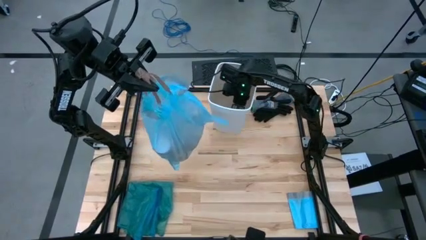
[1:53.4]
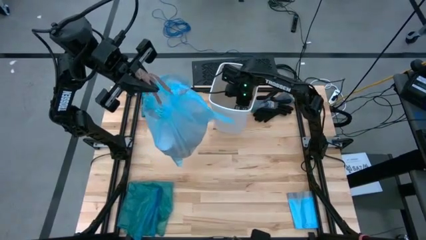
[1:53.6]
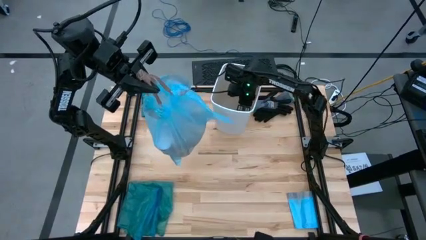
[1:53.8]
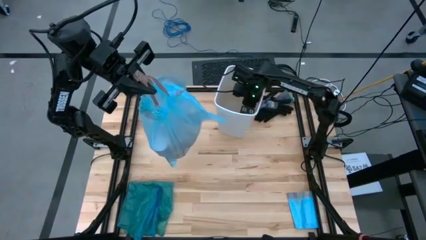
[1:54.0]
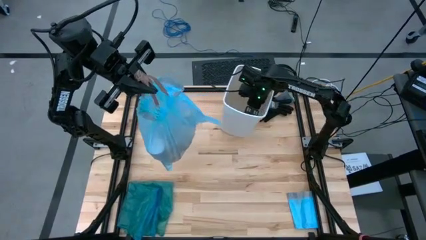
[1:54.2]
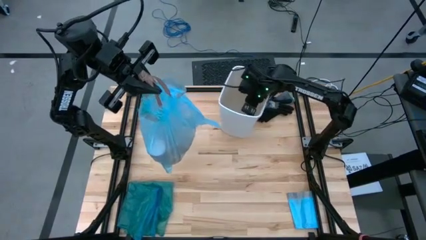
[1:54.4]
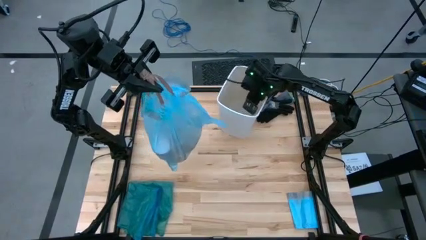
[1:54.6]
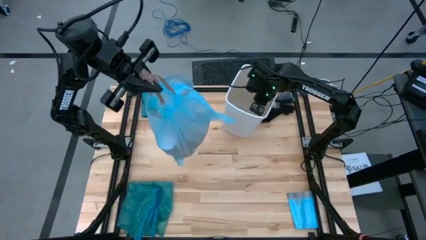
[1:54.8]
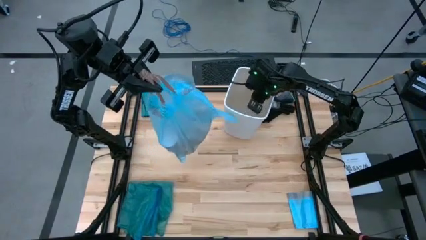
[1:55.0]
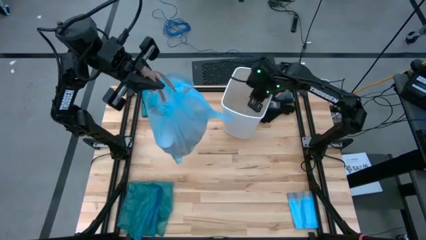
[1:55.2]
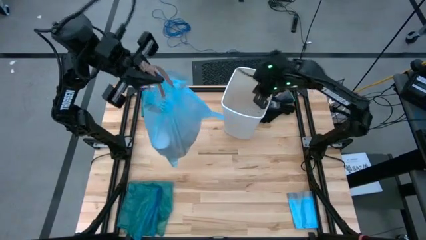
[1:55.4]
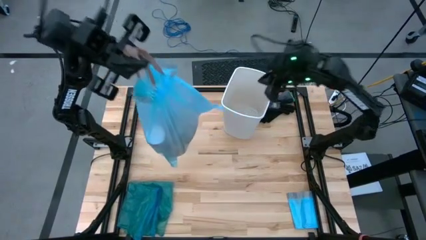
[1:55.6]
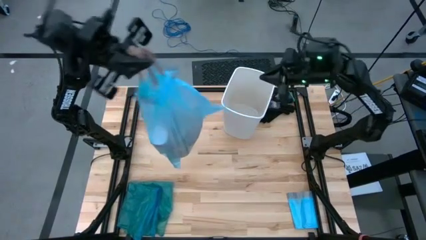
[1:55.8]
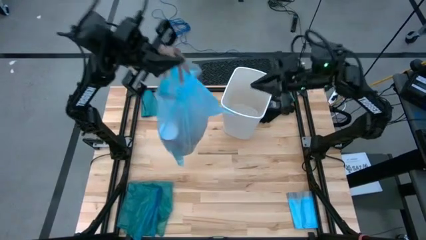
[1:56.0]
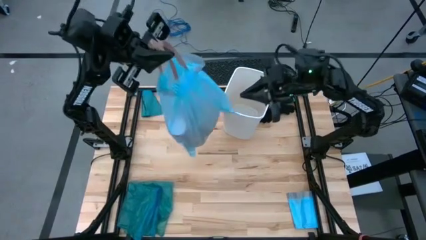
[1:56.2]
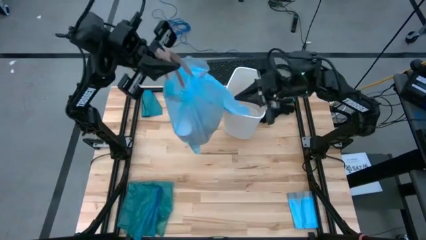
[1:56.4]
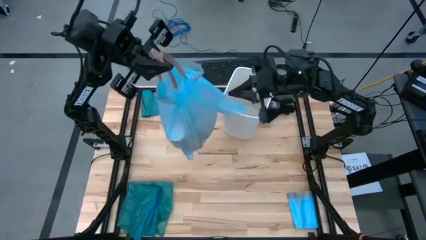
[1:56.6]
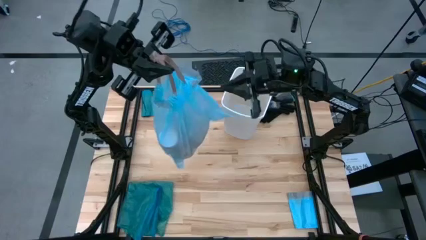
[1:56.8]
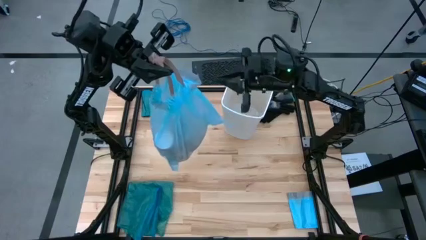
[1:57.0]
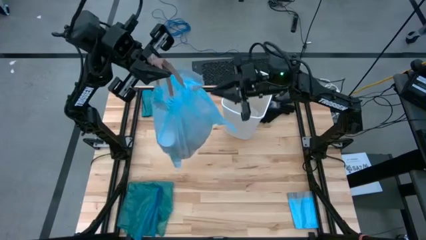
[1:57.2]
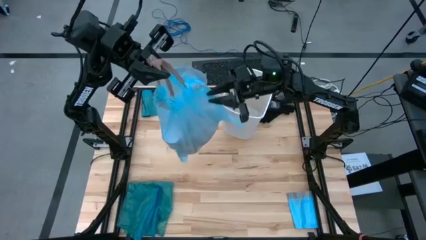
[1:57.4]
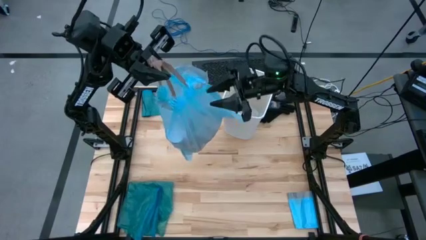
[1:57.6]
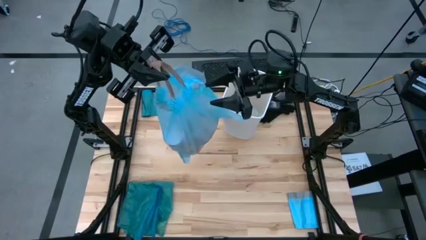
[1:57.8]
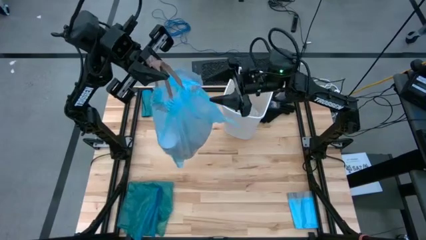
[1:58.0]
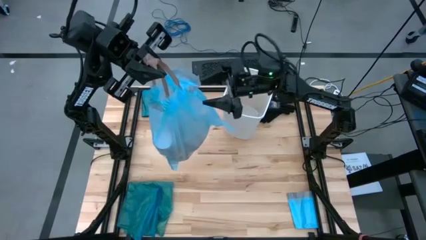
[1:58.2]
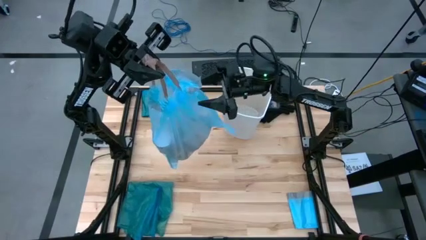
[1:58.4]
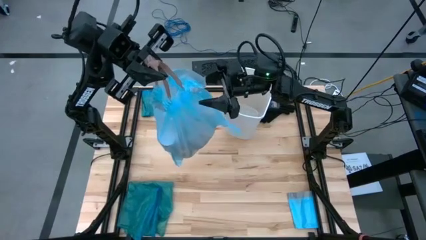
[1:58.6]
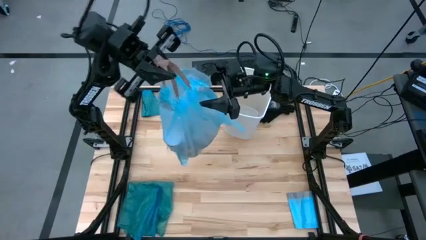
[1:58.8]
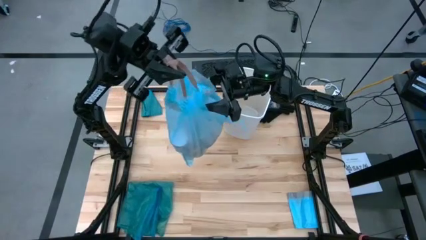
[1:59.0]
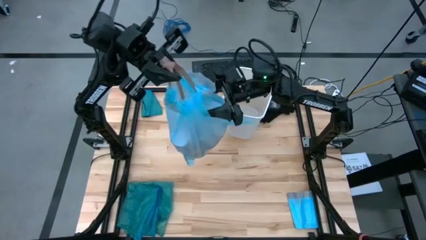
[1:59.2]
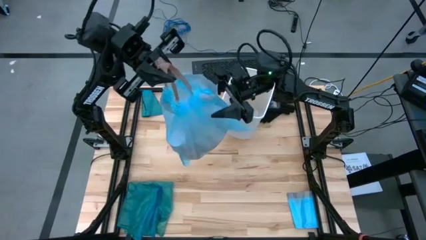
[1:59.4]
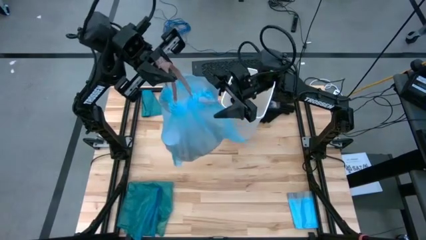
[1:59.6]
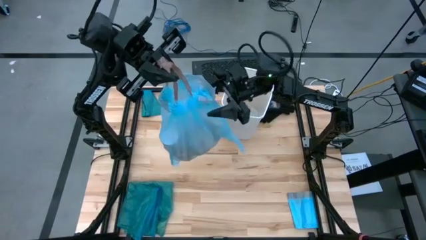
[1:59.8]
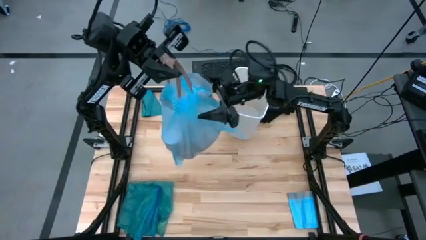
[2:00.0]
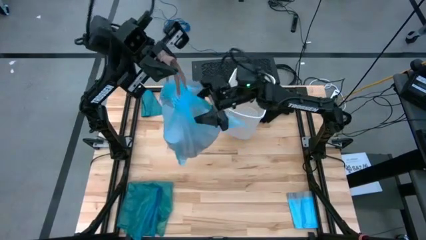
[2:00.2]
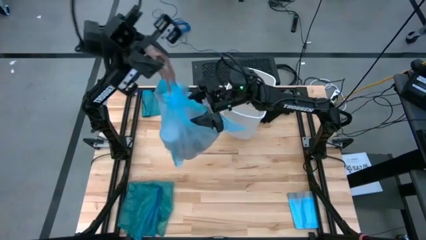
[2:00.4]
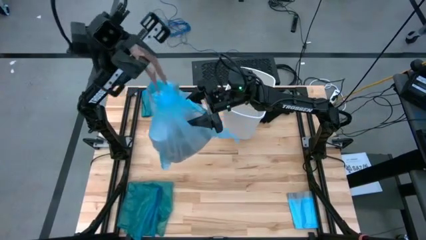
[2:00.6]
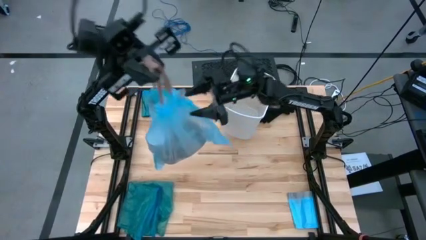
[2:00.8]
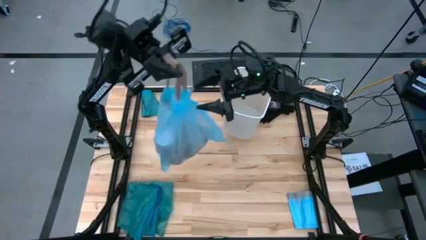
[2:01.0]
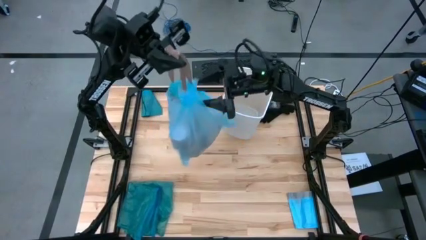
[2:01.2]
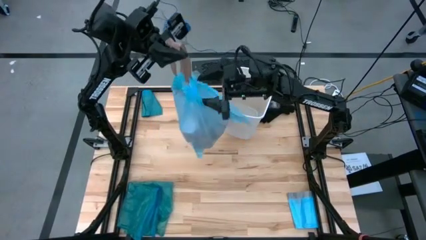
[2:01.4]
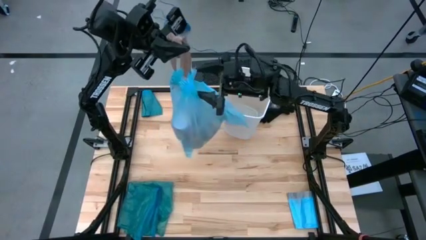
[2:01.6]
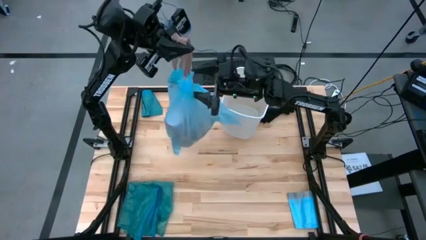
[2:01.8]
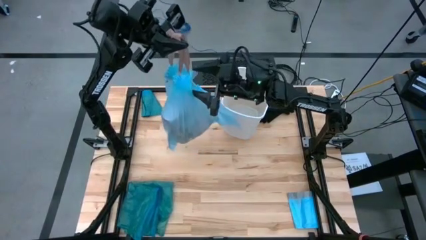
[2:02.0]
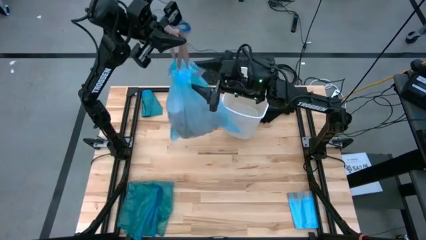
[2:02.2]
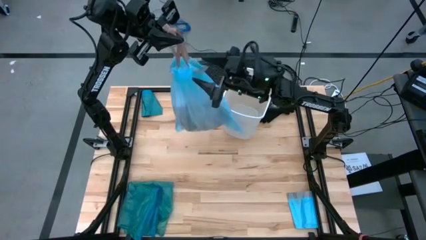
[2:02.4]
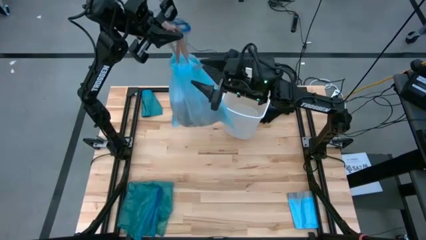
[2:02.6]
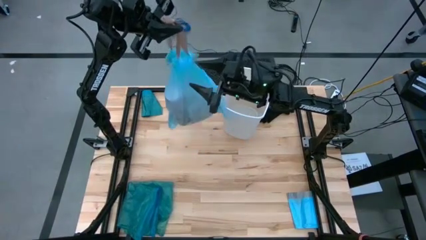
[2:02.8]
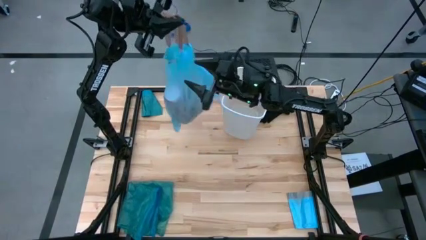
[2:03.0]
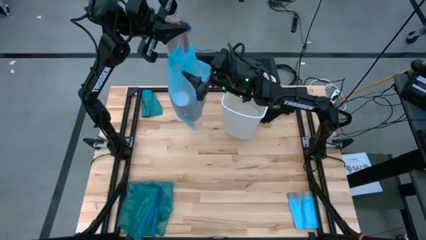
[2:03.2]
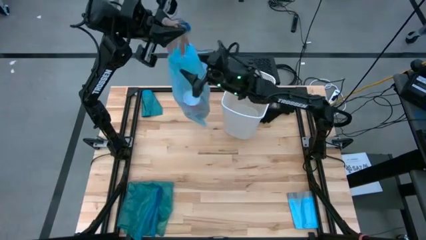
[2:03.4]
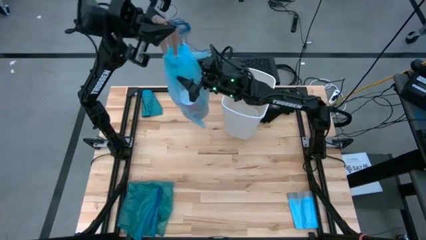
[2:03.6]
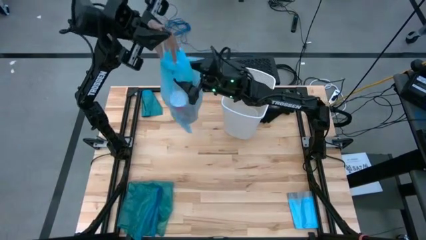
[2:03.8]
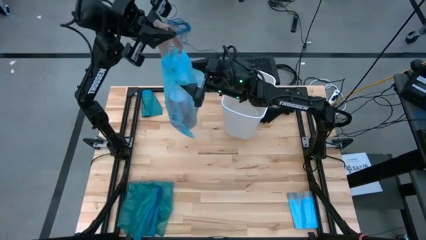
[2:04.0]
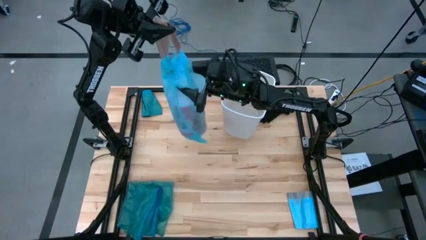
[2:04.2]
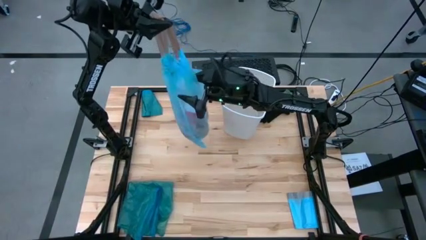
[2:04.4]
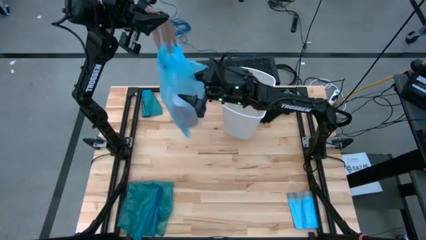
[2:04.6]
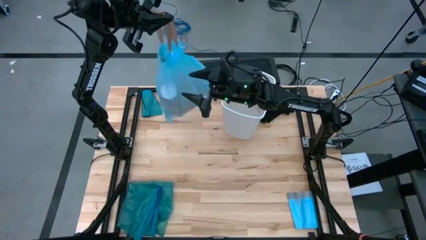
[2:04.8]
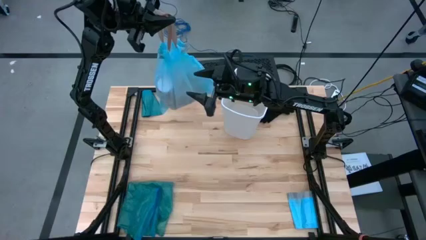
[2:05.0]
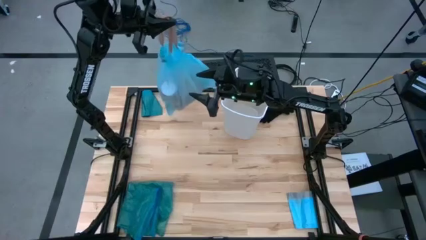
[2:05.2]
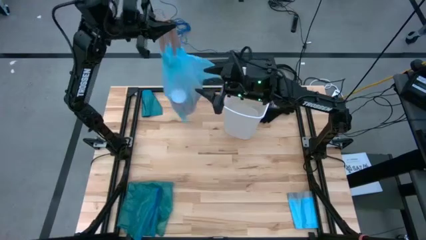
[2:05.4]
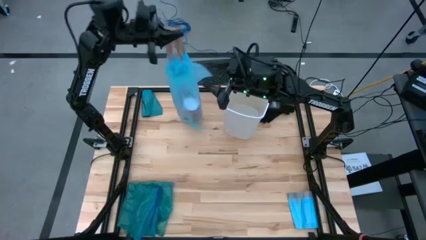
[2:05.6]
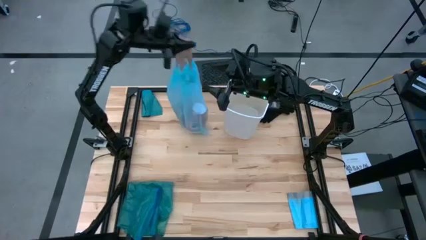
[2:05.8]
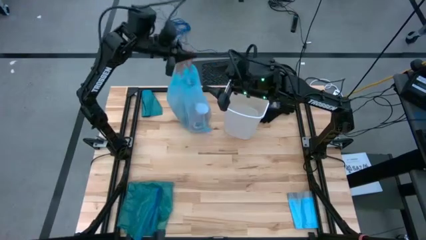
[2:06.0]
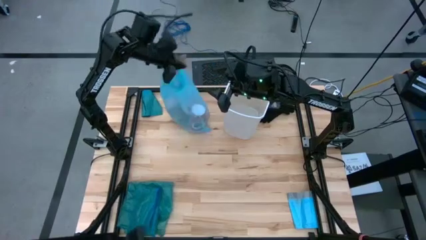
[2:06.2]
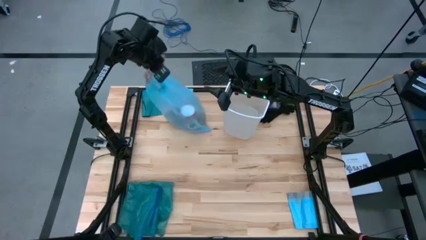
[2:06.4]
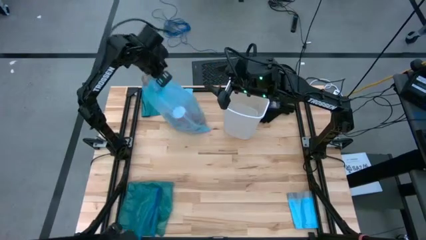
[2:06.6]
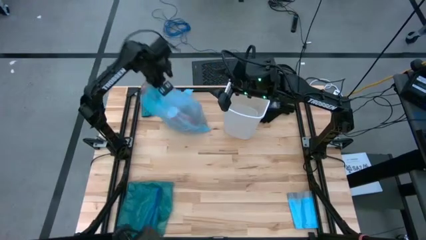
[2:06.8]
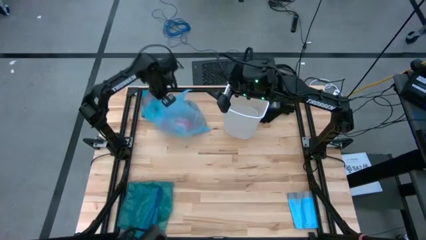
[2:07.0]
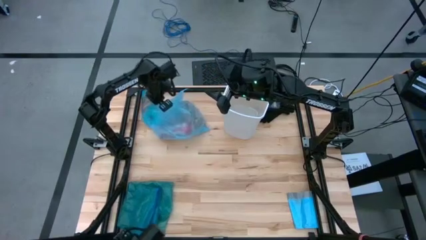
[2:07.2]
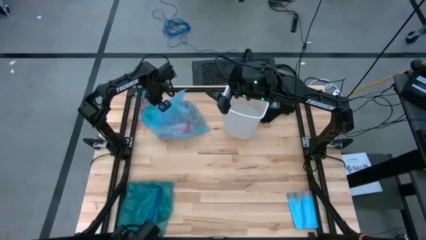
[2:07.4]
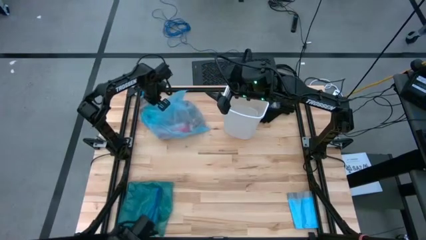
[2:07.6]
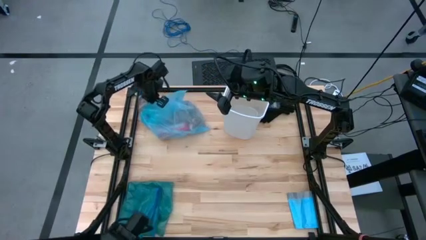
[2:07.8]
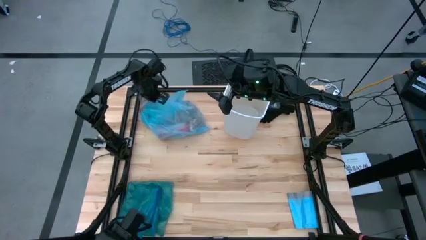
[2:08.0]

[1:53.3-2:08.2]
Task: place trash/remove bag and relplace
Remove the light blue trash bag from the white trash bin
